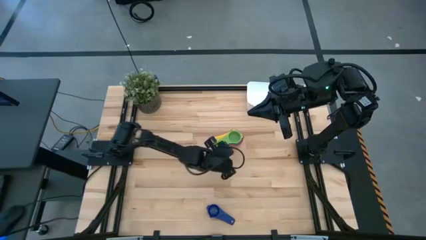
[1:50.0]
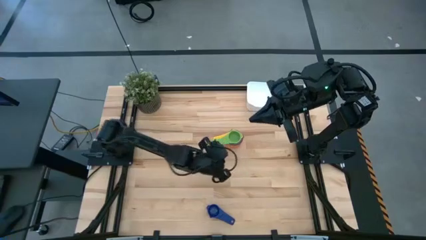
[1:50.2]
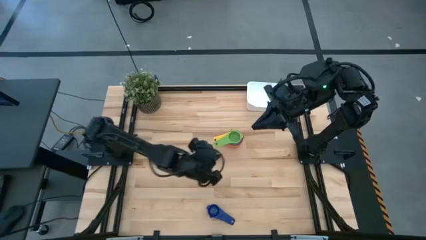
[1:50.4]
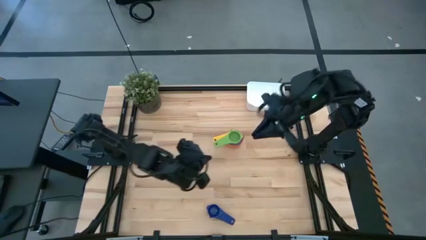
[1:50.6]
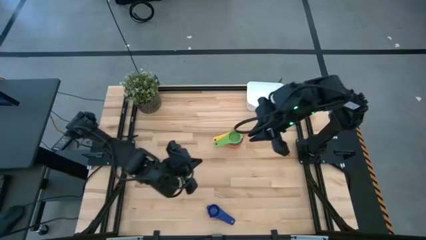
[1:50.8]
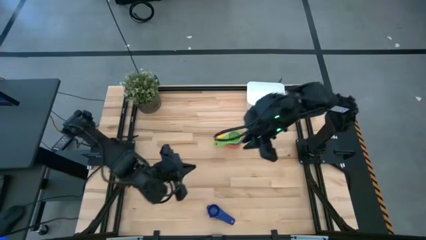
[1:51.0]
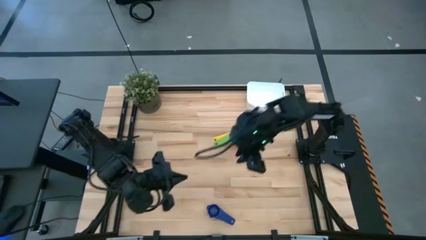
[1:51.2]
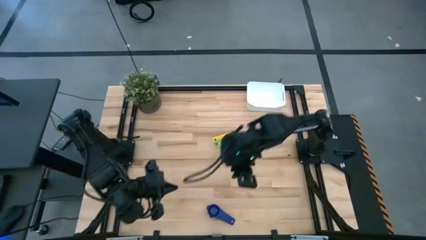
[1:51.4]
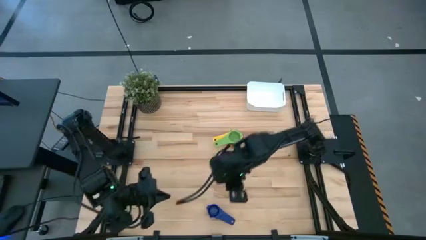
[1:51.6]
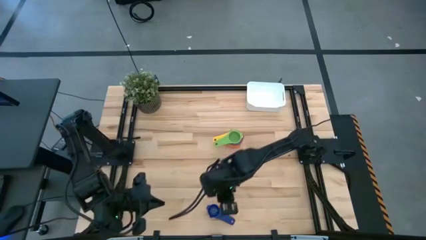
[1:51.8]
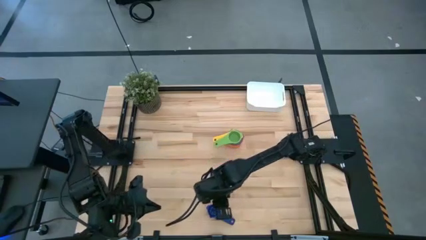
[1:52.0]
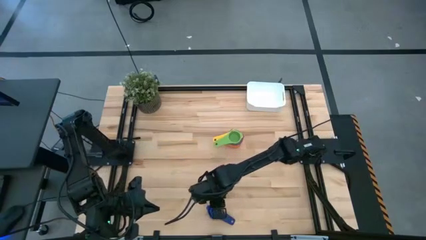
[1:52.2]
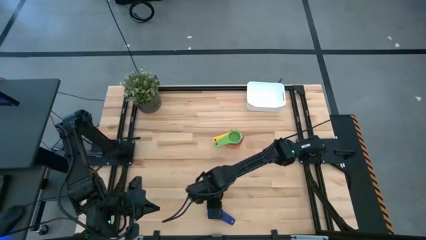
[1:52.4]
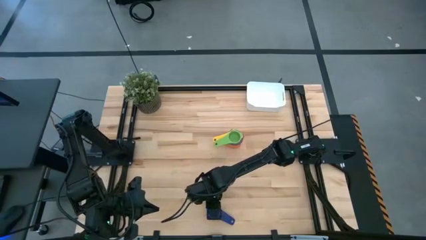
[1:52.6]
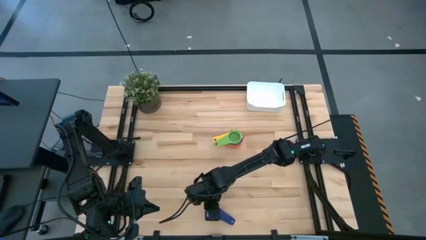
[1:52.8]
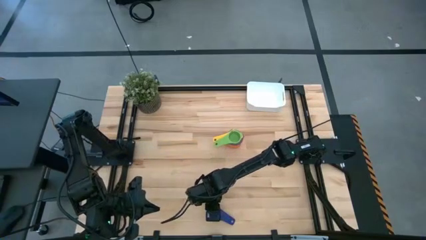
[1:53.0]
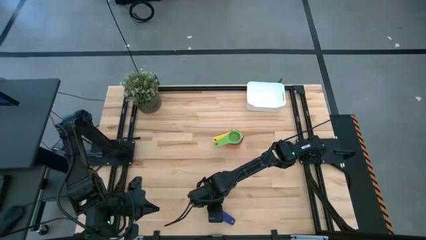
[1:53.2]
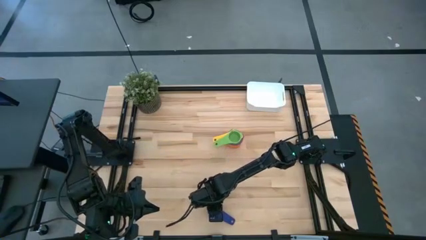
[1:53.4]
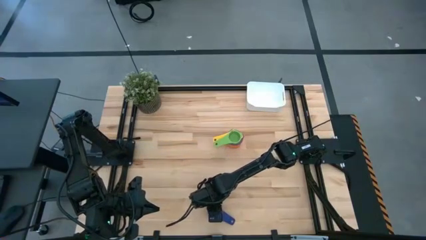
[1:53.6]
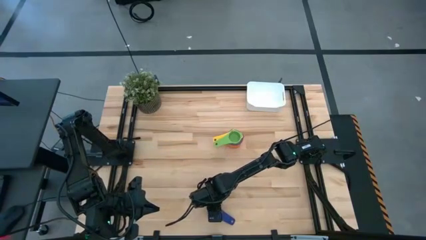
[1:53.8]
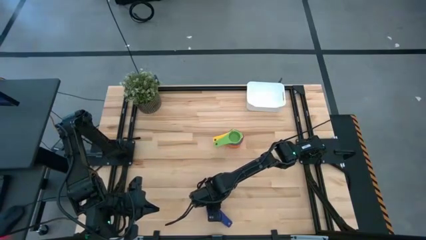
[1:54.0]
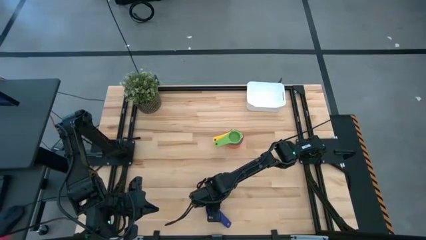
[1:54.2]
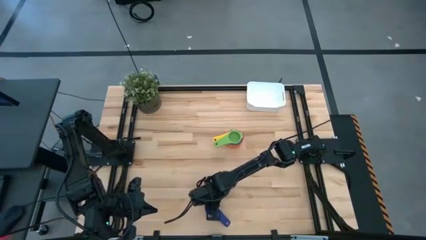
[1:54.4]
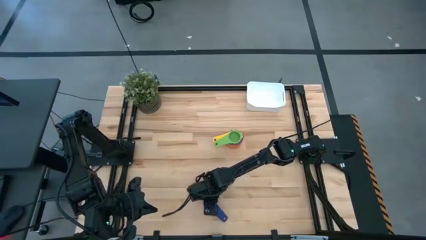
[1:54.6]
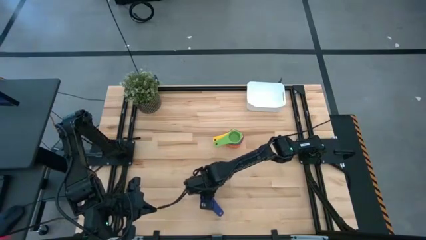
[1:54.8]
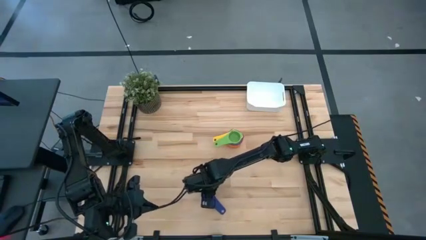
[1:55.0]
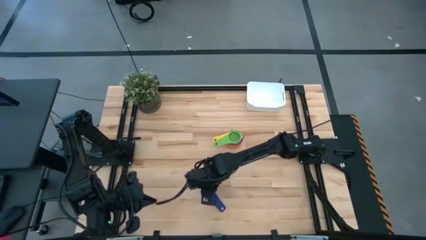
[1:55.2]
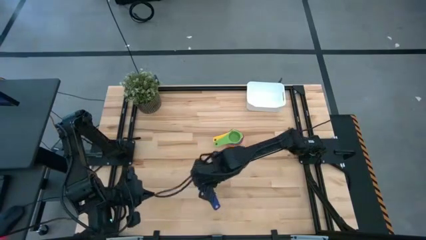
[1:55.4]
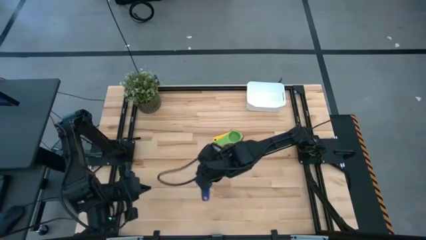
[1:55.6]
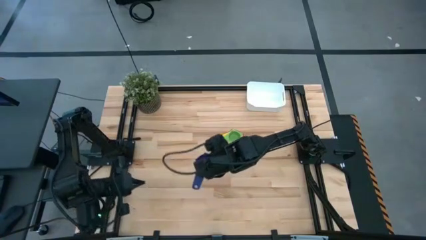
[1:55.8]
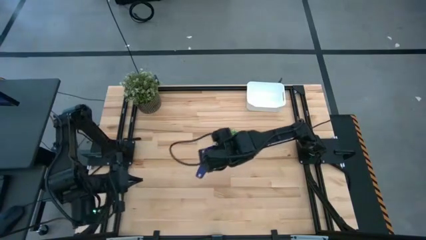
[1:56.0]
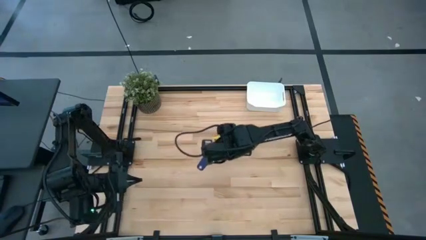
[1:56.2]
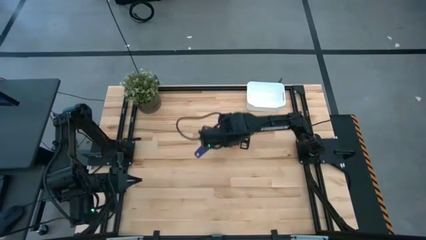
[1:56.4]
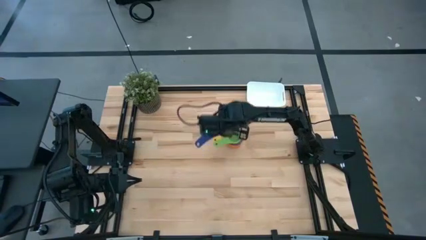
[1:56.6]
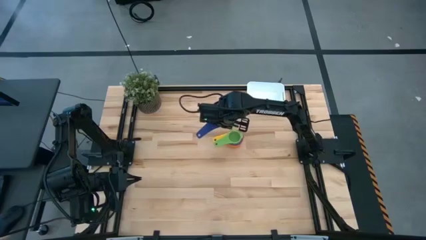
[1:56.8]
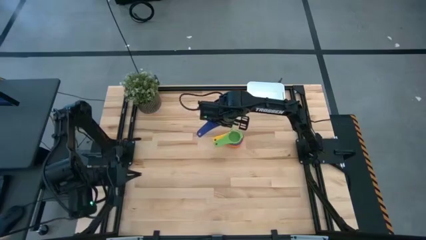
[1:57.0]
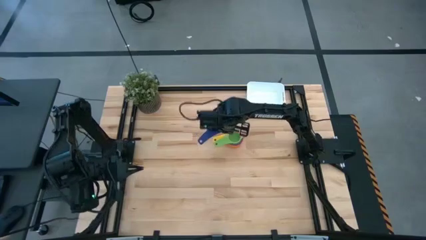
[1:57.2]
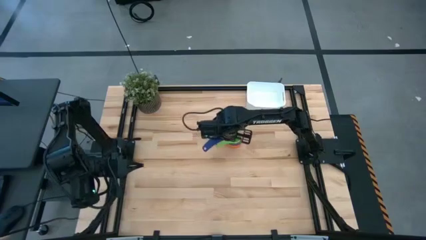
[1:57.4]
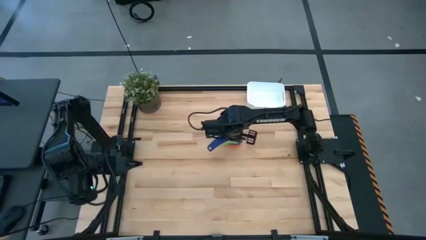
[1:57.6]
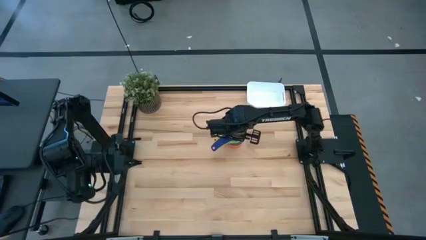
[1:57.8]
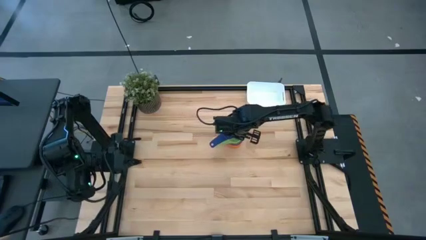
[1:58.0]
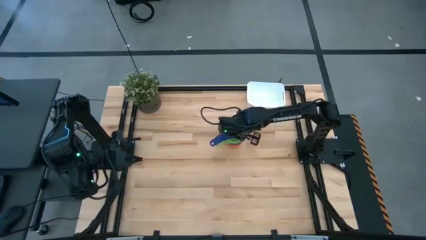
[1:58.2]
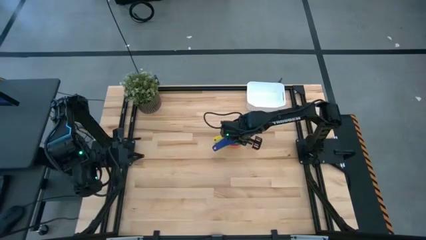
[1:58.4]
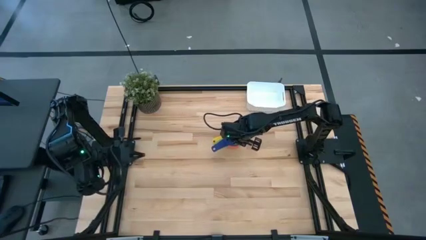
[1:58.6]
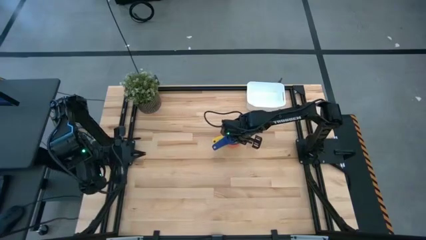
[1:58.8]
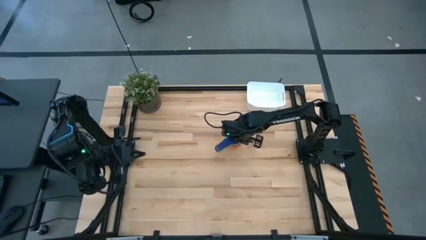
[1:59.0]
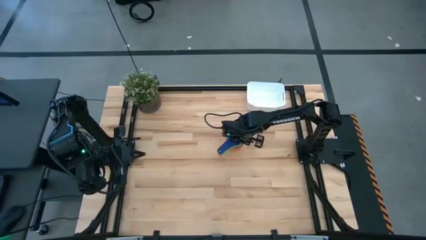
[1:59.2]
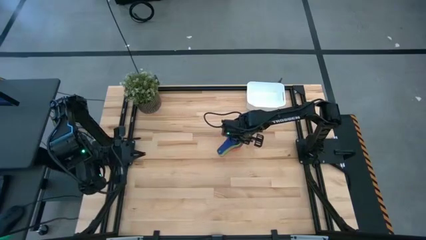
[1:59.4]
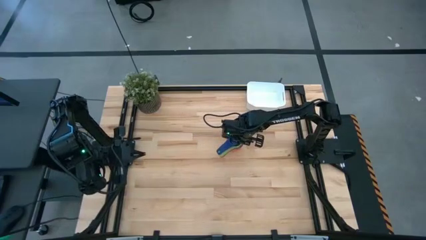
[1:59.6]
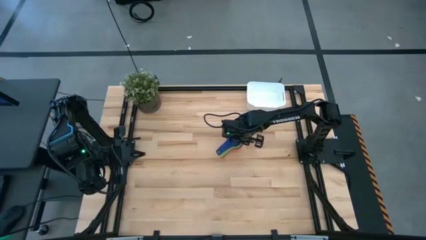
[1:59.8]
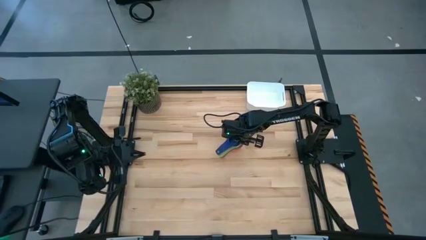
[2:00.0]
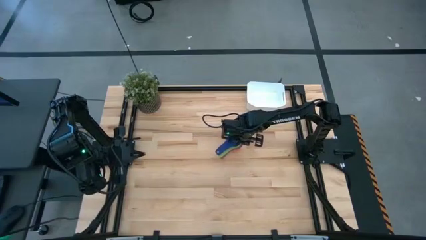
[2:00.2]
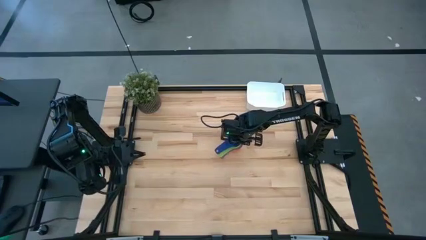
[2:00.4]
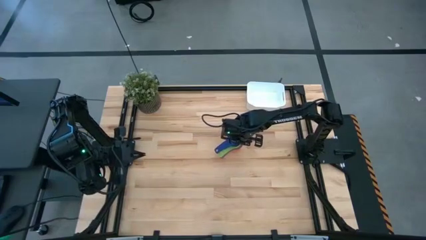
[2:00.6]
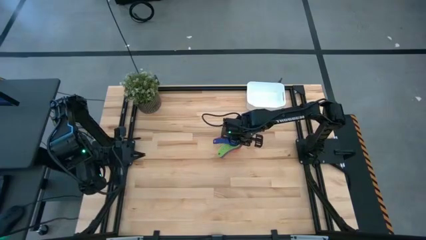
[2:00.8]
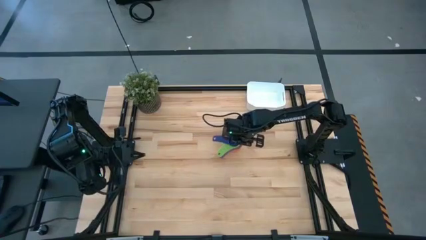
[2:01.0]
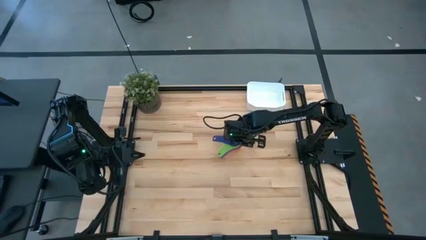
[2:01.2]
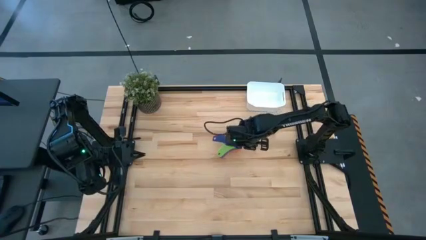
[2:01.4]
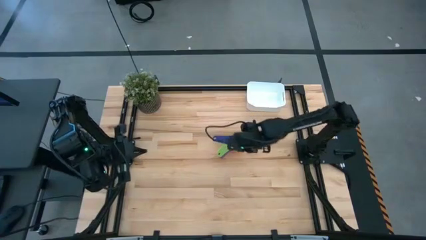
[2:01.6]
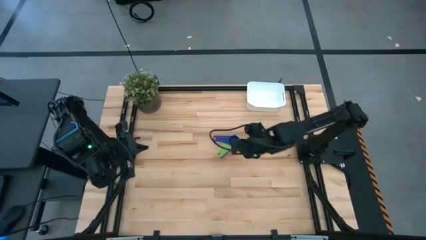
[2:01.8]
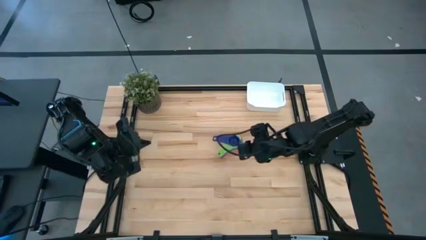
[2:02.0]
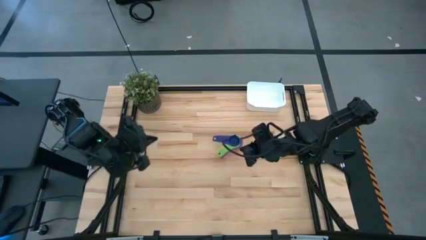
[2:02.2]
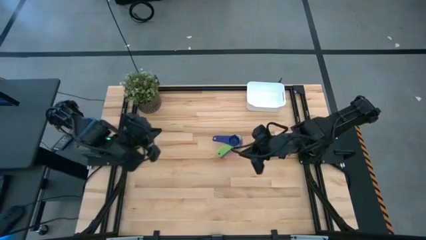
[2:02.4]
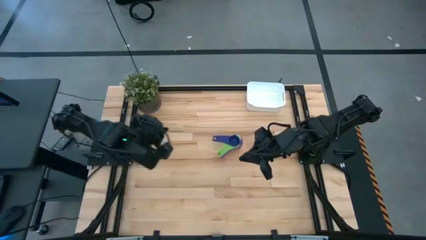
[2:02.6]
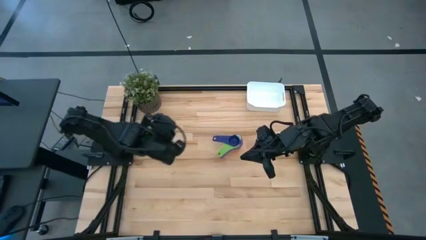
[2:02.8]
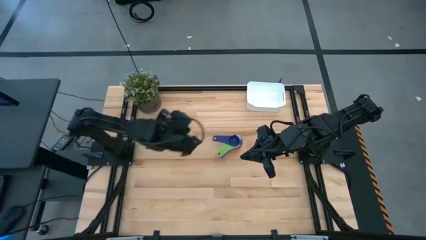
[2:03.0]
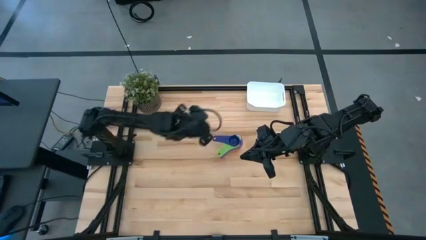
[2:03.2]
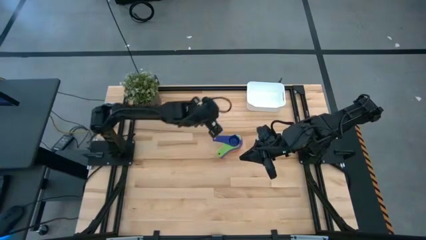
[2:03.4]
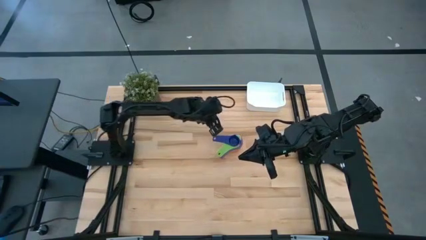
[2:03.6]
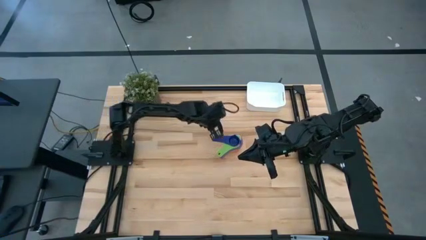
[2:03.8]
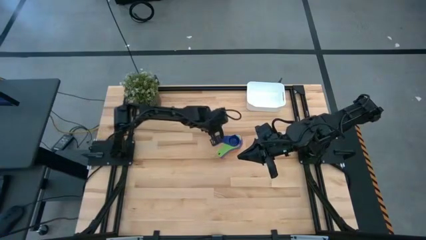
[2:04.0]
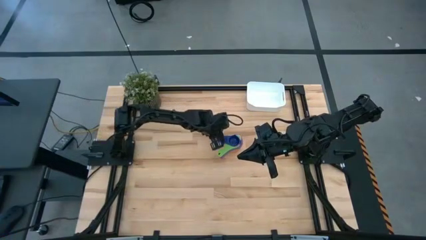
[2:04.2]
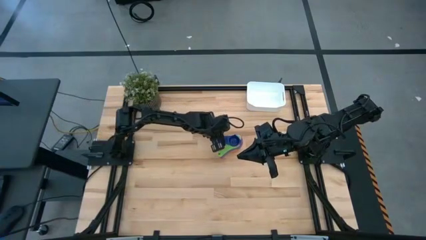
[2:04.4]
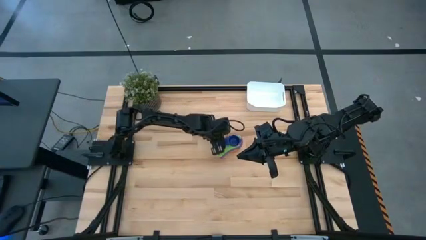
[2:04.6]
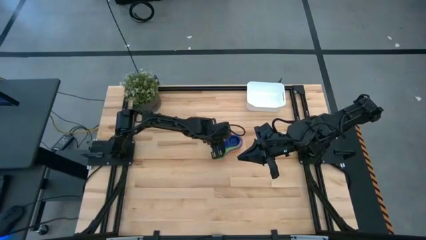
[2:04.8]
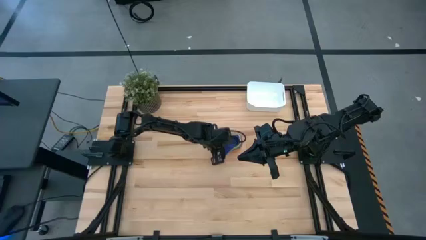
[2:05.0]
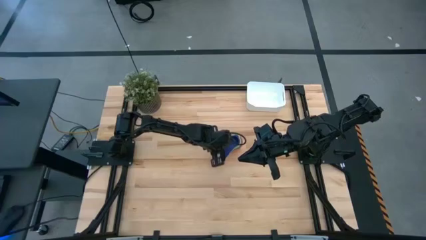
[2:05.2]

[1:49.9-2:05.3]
Task: Nest measuring cups in basket
Stack the dark blue measuring cup on top of the green measuring cup
